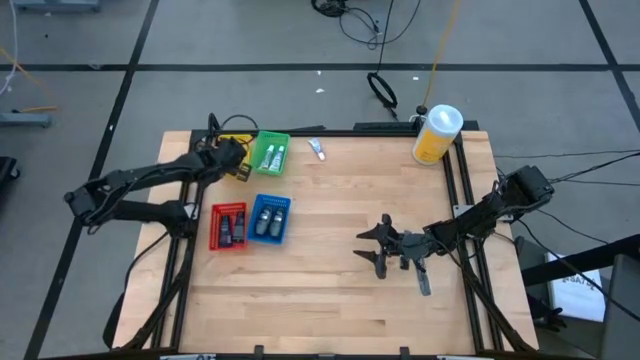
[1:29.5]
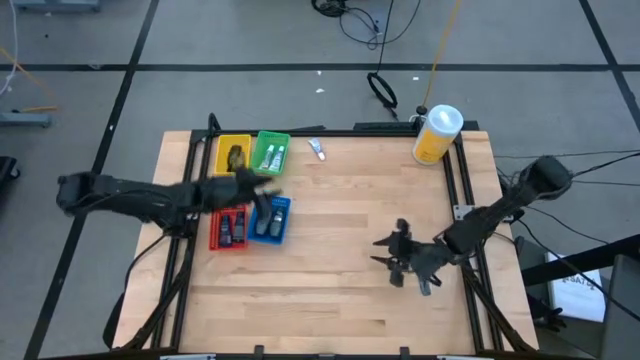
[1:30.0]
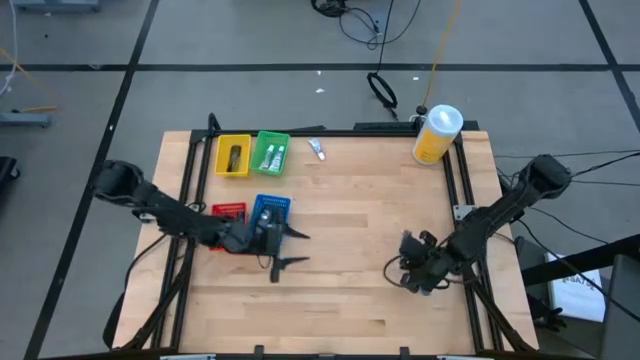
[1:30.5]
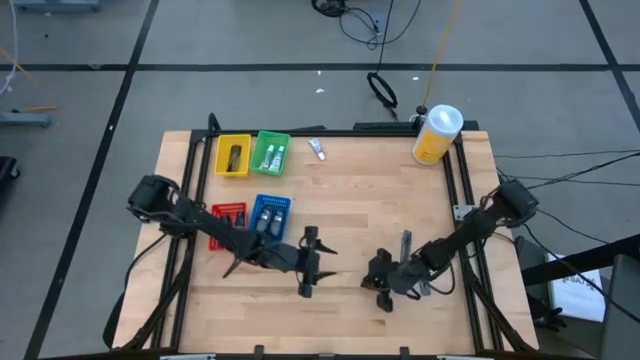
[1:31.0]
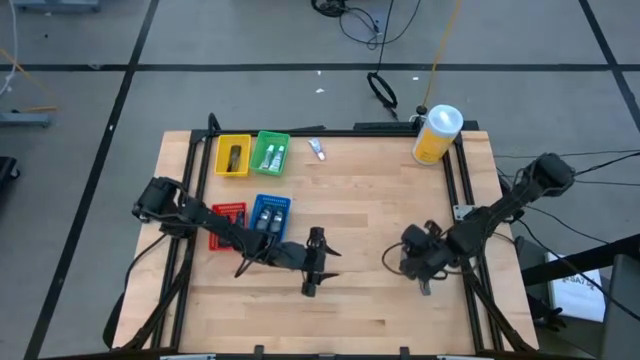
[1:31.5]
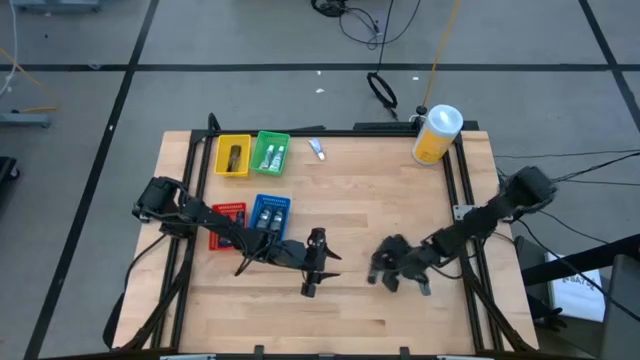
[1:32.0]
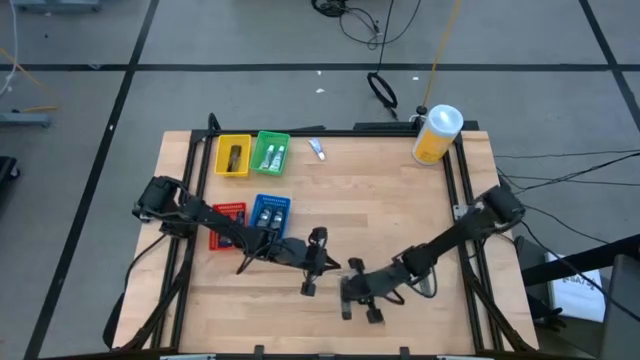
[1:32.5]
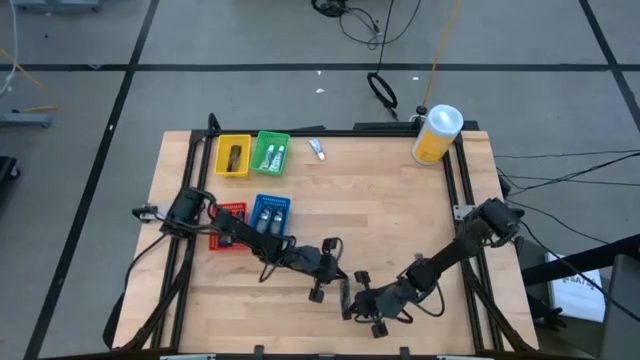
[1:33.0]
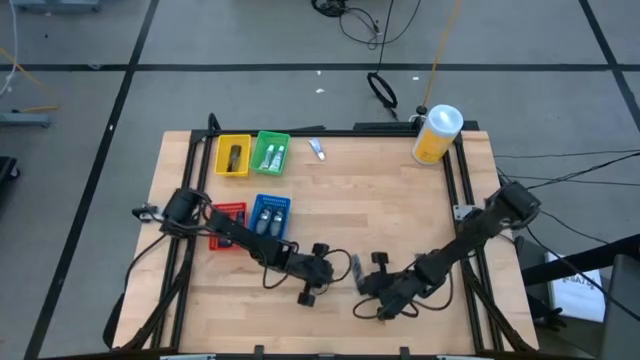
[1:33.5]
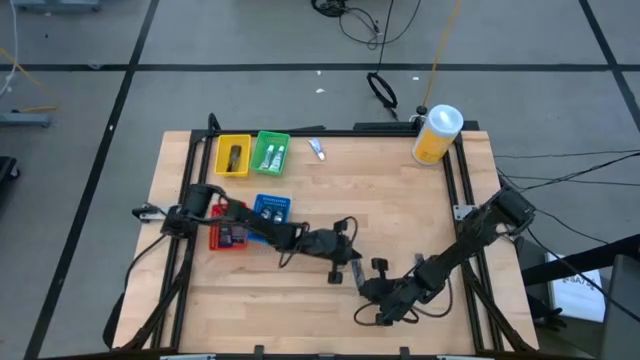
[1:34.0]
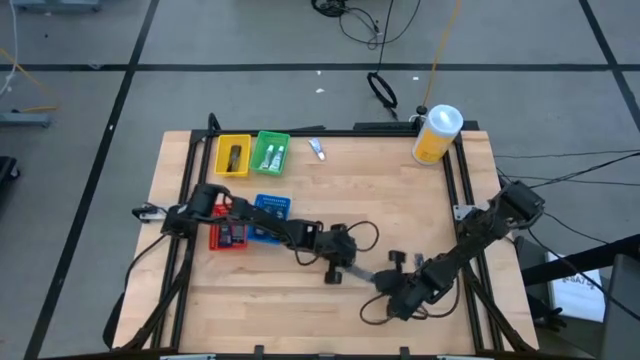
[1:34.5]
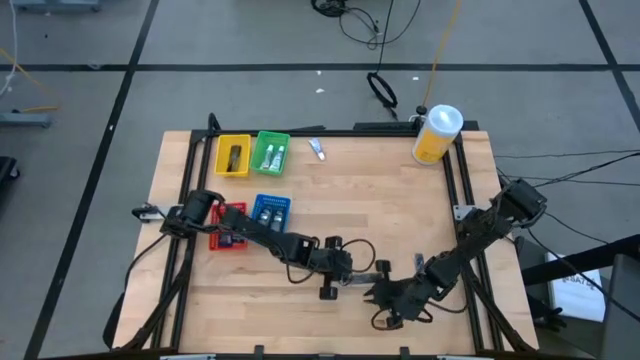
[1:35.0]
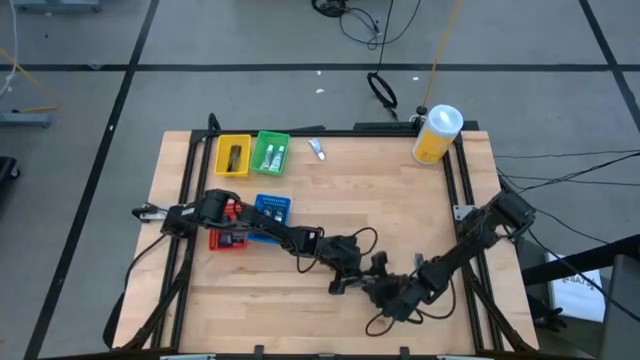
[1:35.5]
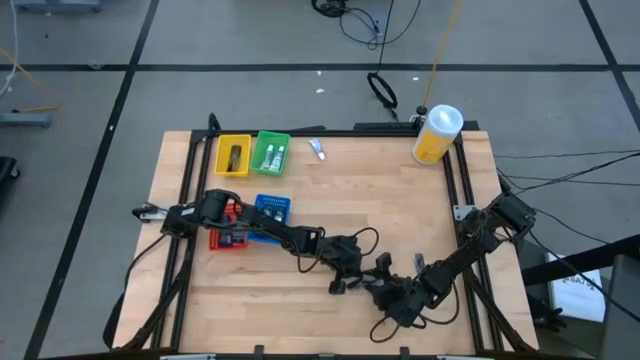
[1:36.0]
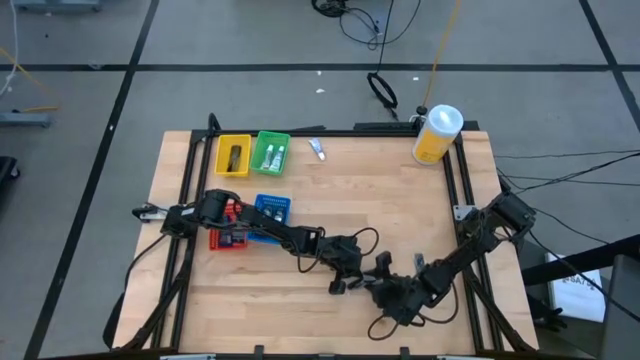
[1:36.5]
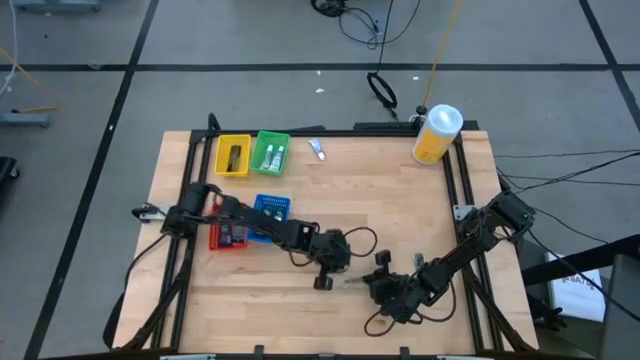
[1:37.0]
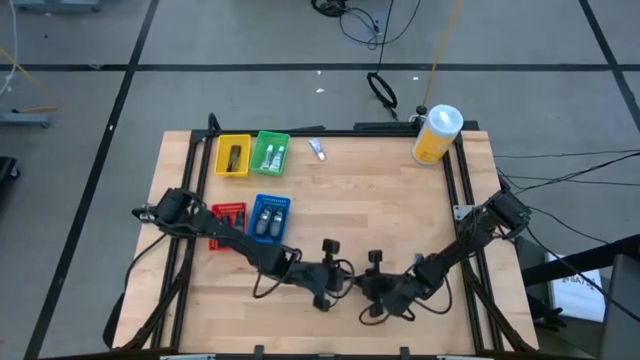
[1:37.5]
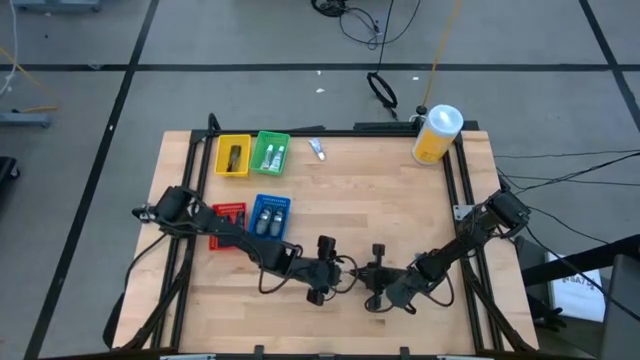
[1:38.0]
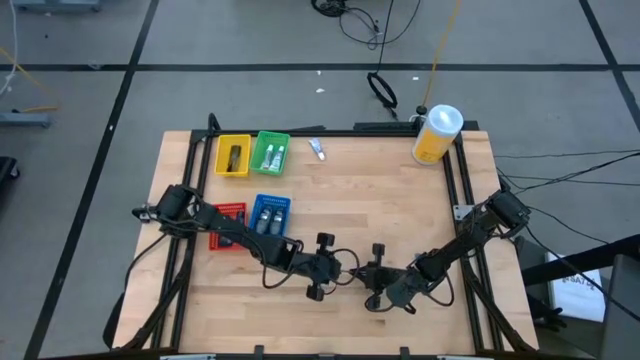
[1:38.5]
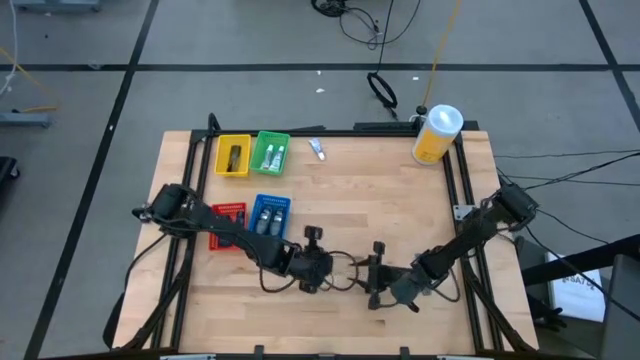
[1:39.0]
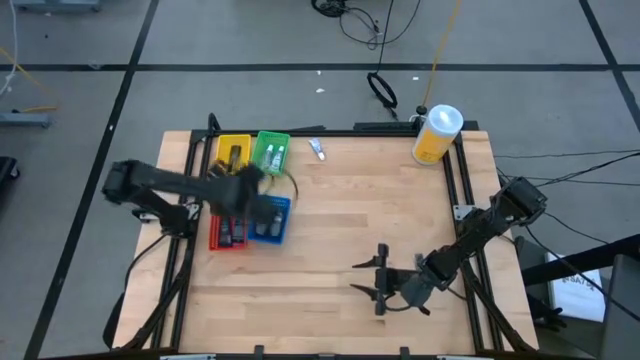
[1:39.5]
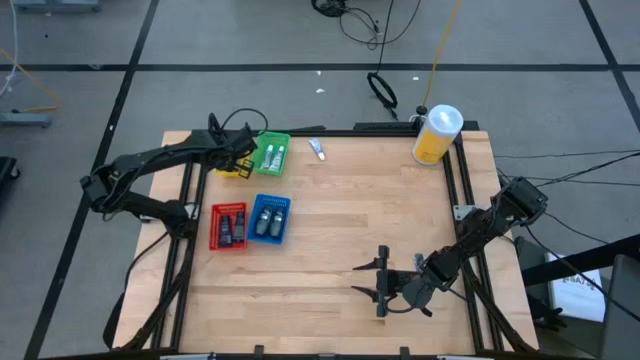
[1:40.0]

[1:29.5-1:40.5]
Task: Pick & Place Travel size toiletries
Put the black comb into the yellow bin

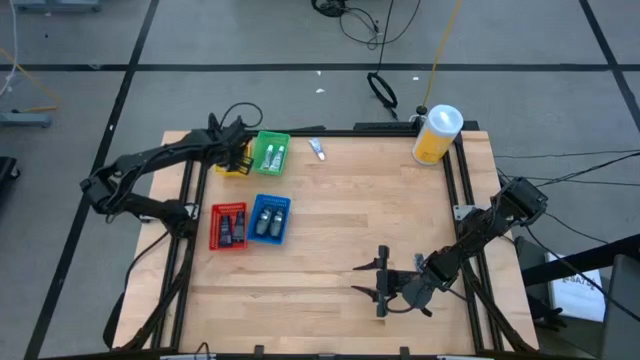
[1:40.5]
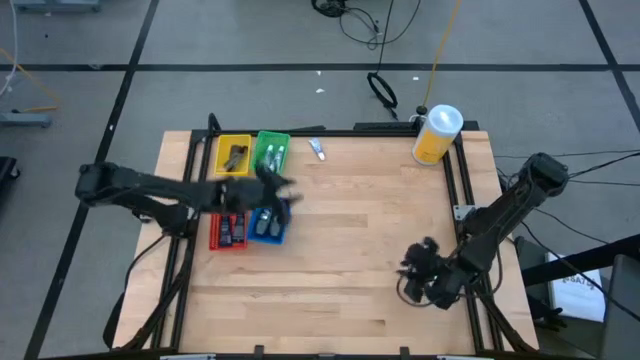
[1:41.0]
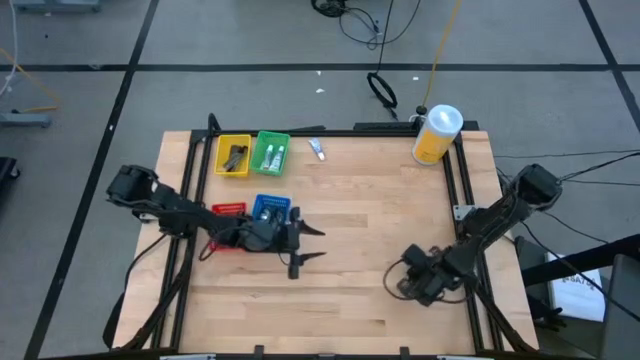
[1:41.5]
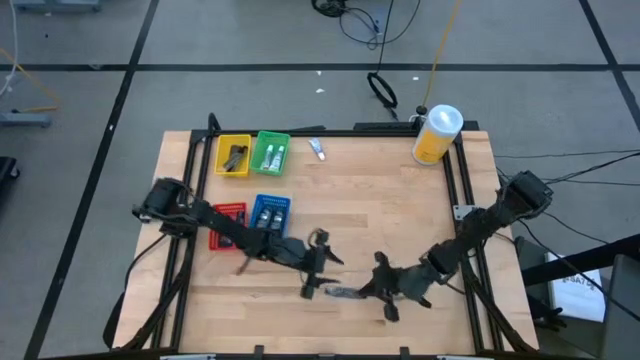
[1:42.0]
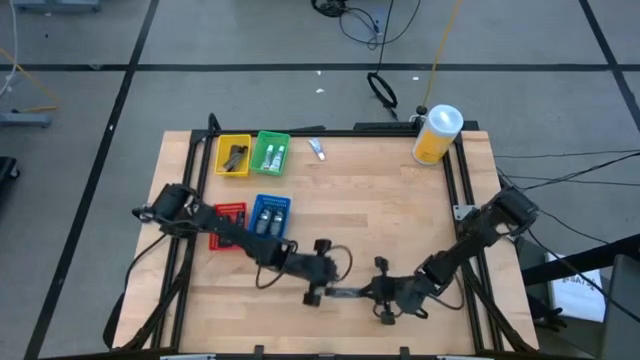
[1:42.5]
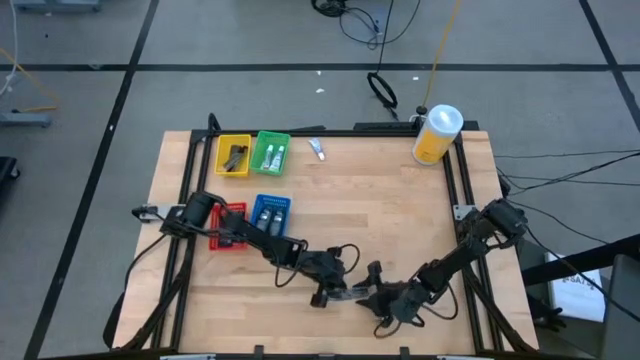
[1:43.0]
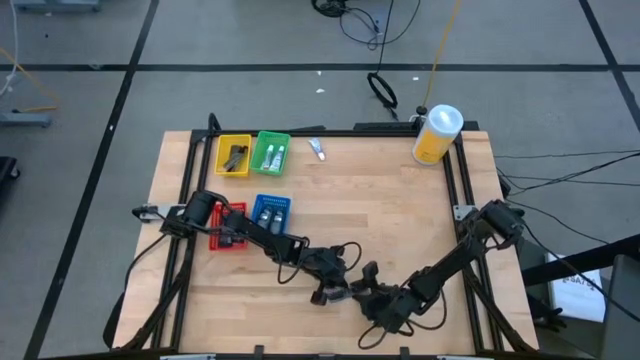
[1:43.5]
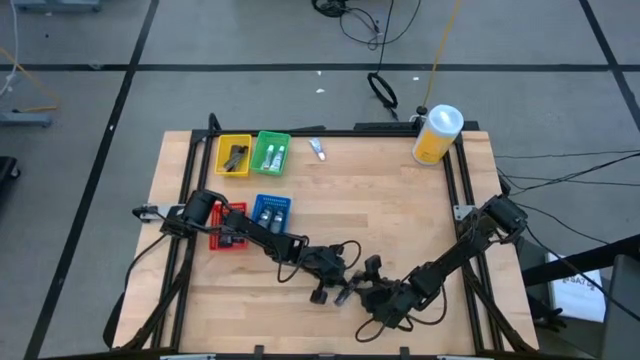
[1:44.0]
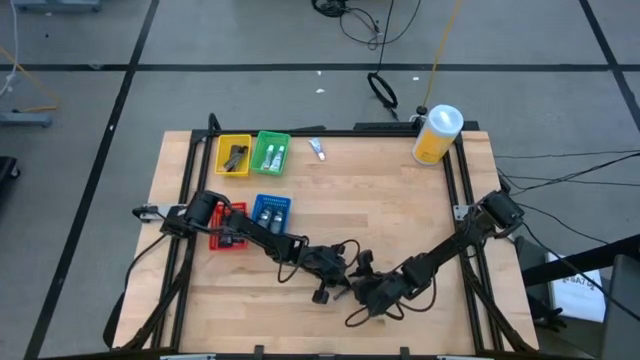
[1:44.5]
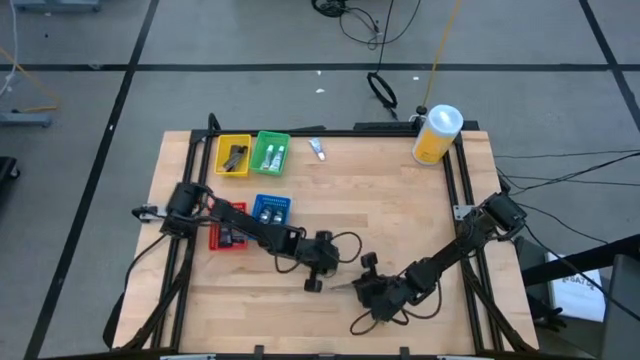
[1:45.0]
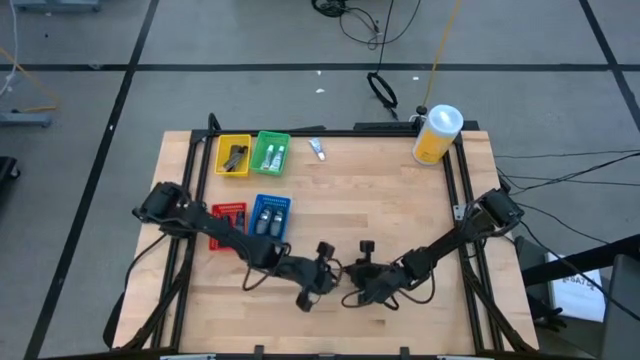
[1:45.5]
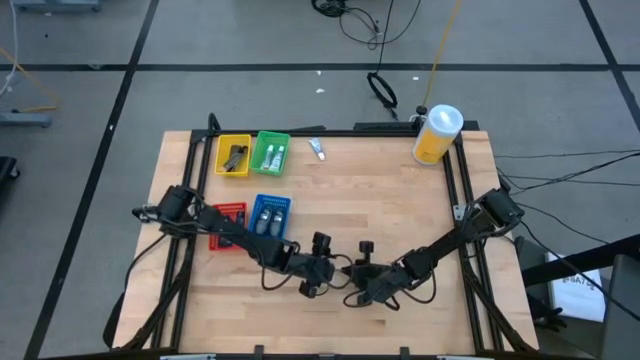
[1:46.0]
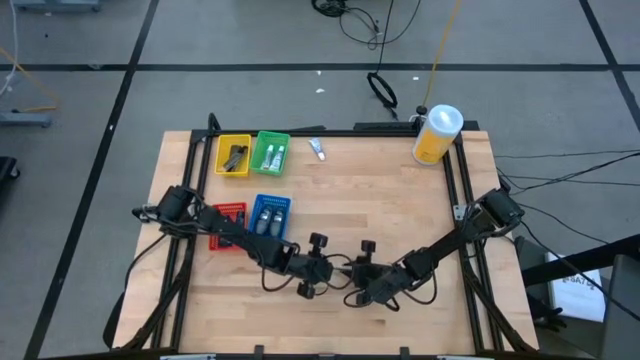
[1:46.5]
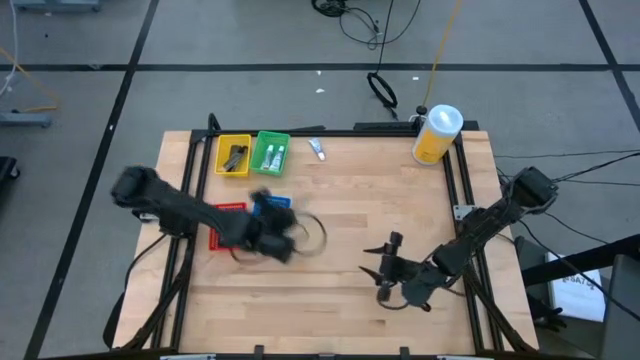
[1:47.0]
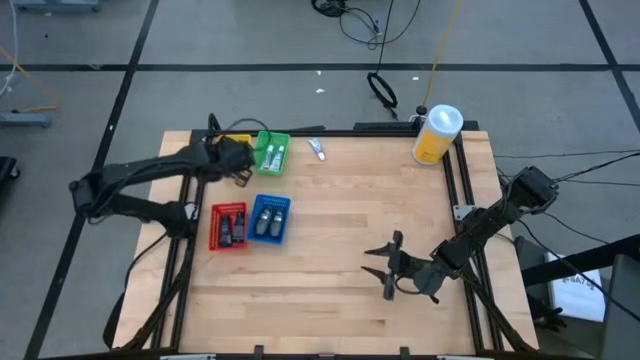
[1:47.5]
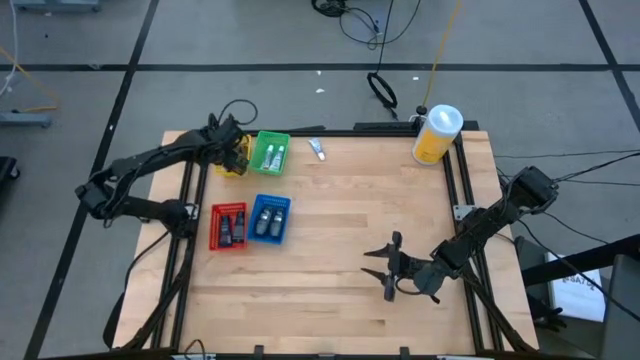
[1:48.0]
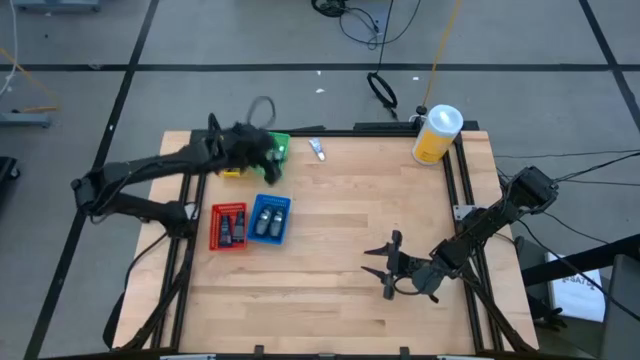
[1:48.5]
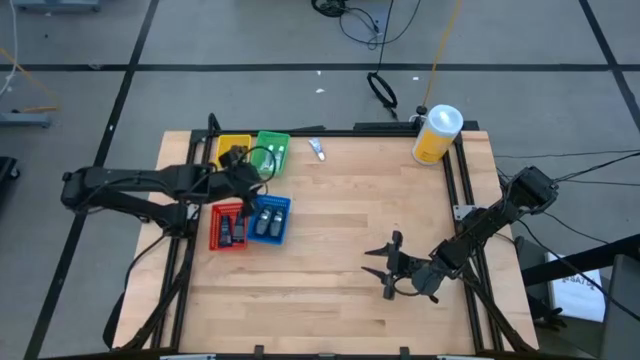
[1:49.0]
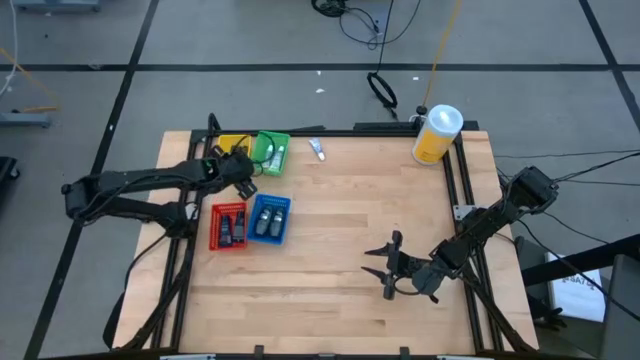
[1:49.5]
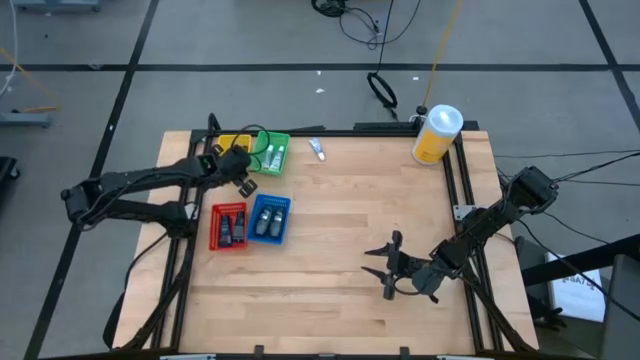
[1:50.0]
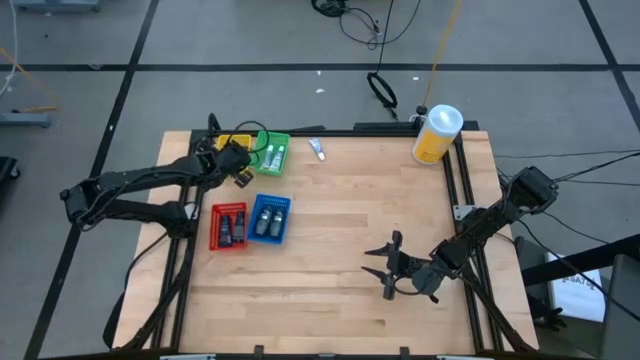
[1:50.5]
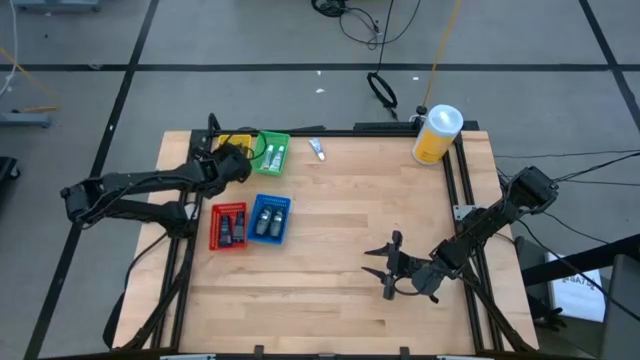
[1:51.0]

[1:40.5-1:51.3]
Put the black comb into the yellow bin
